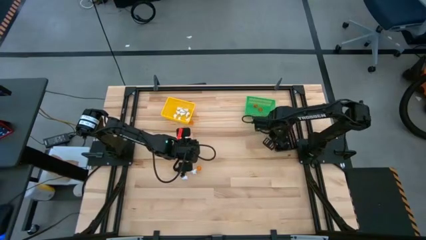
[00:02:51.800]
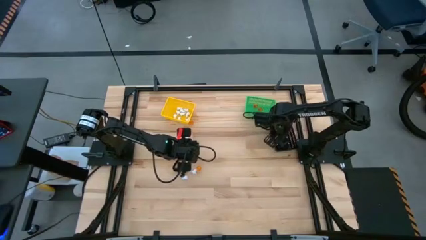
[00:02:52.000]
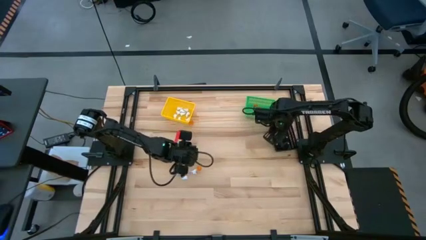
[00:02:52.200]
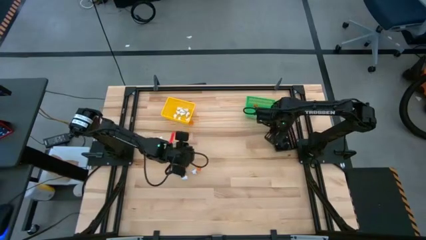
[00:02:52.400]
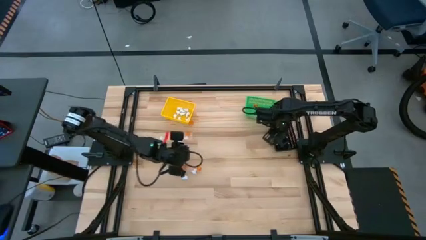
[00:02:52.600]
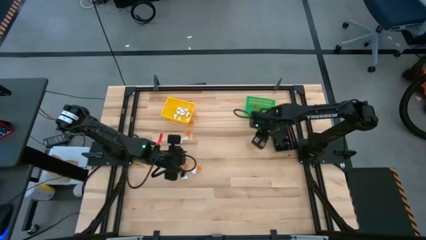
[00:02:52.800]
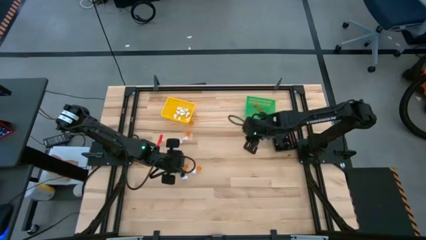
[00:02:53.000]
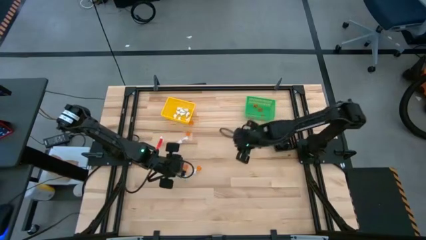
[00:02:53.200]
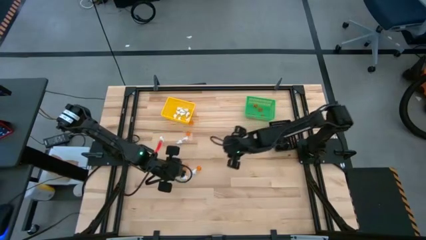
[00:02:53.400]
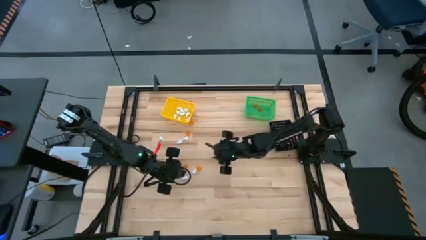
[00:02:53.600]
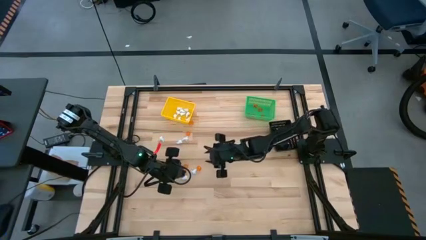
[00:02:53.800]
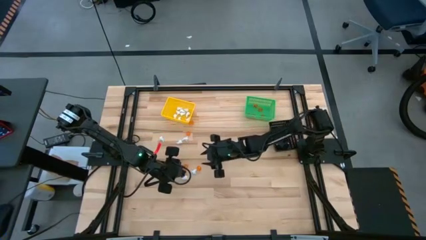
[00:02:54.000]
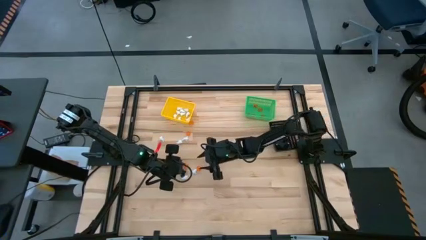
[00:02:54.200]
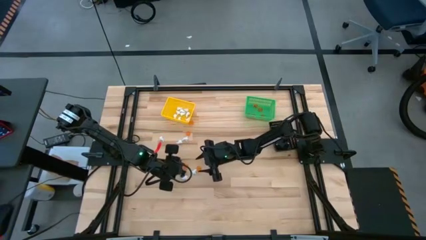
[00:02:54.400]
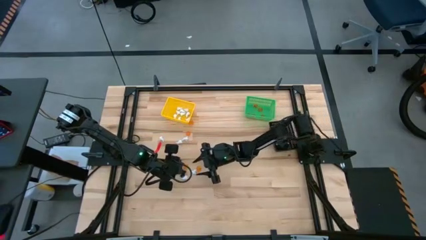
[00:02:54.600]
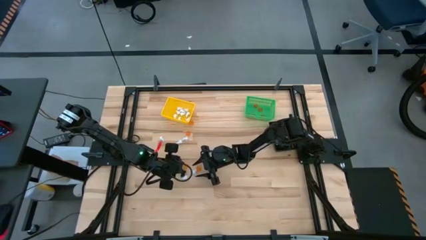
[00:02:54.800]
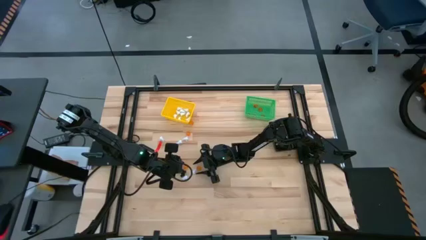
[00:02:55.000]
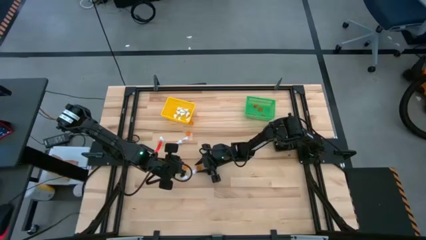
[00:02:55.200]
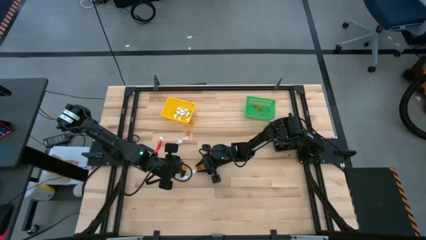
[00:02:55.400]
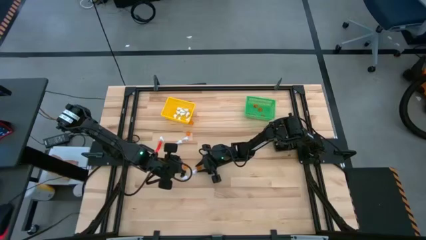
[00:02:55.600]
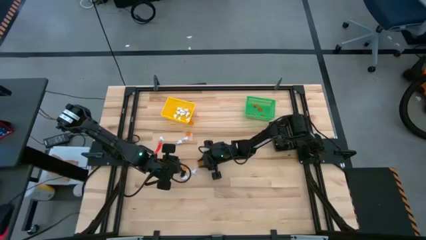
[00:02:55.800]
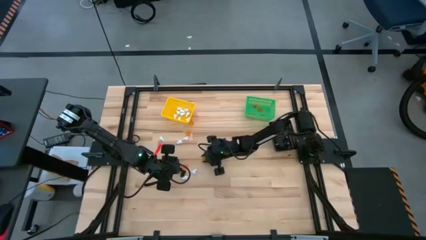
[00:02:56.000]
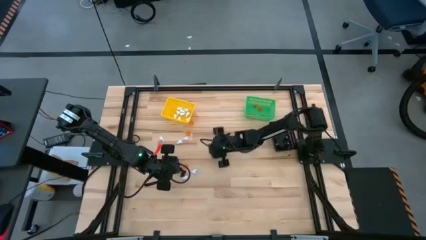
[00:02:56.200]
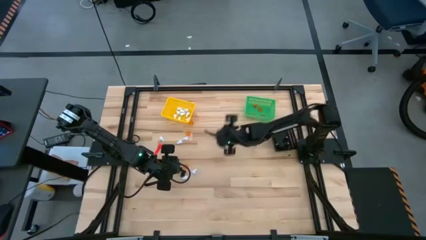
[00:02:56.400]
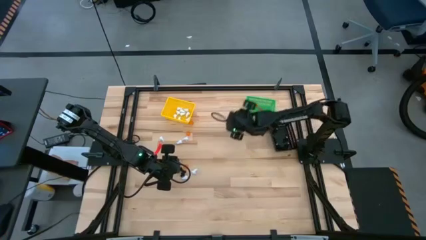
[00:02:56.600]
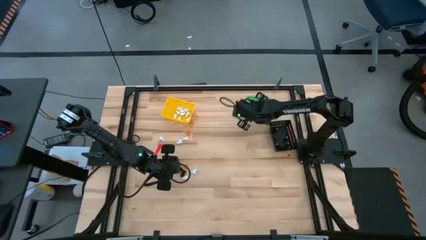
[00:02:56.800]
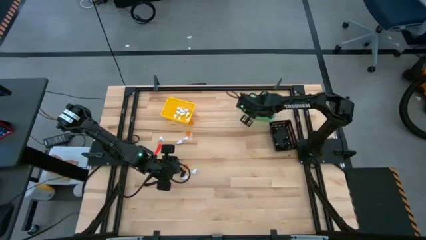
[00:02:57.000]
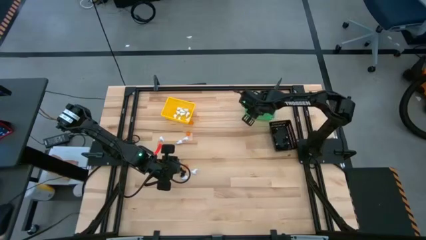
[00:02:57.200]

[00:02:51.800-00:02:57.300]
Task: Sort Halloween decoration
Put the orange pumpkin toy into the green bin

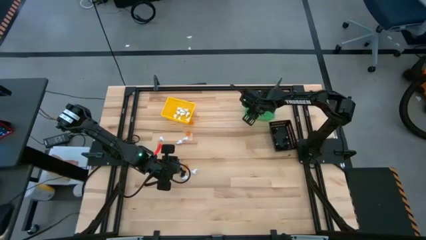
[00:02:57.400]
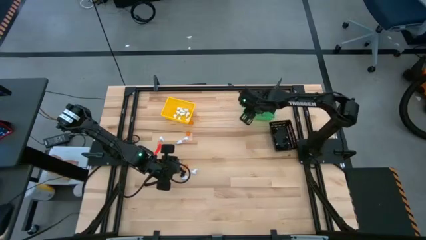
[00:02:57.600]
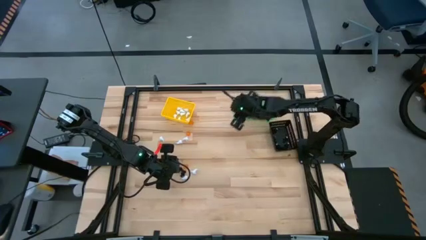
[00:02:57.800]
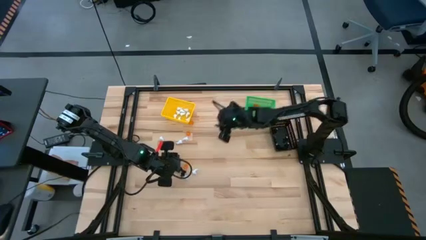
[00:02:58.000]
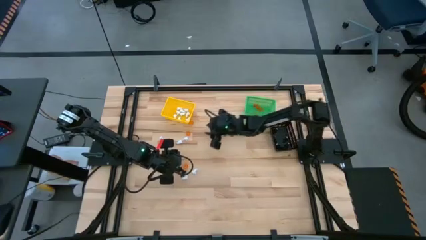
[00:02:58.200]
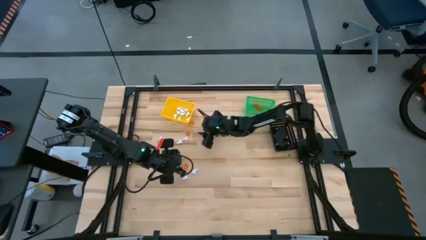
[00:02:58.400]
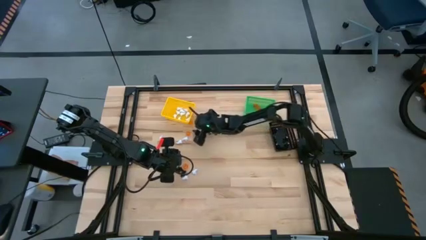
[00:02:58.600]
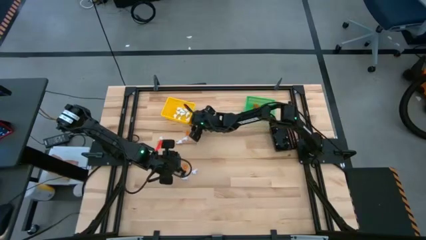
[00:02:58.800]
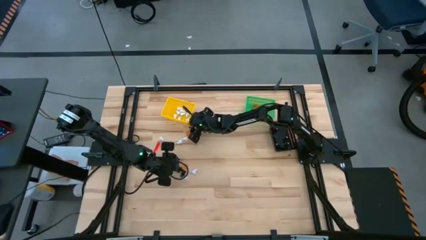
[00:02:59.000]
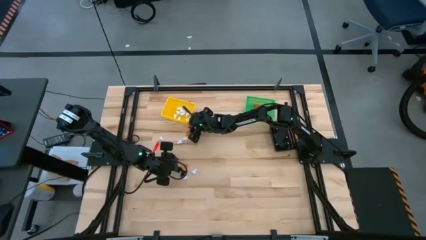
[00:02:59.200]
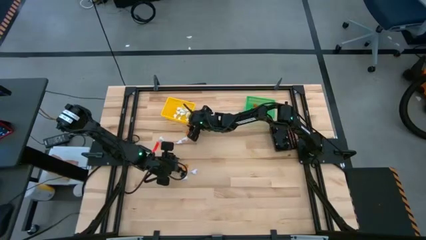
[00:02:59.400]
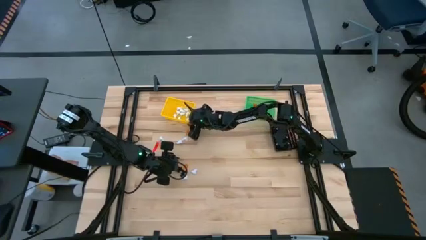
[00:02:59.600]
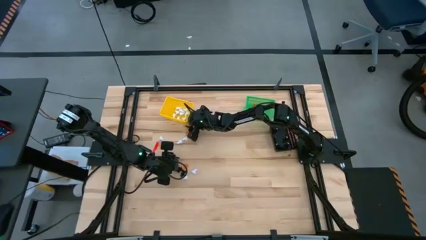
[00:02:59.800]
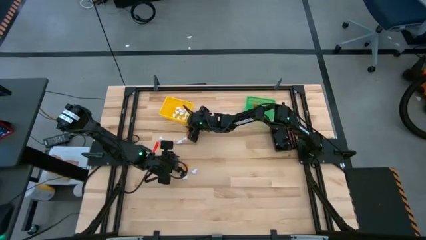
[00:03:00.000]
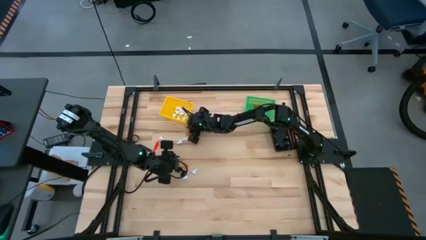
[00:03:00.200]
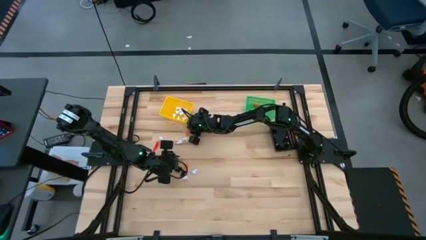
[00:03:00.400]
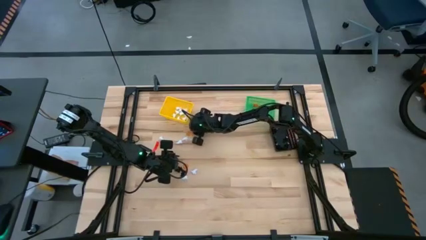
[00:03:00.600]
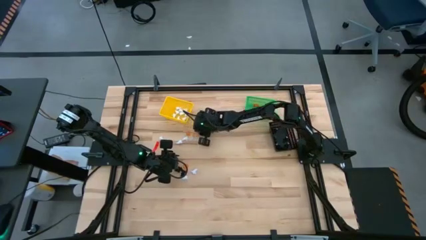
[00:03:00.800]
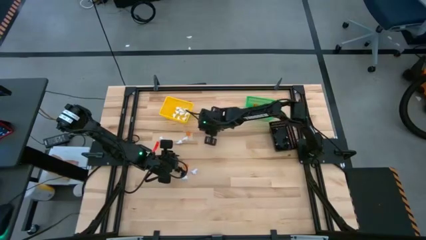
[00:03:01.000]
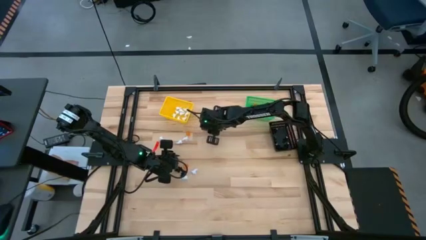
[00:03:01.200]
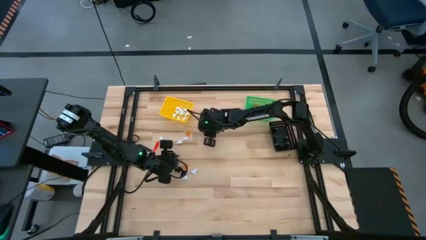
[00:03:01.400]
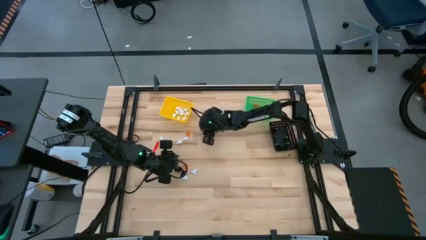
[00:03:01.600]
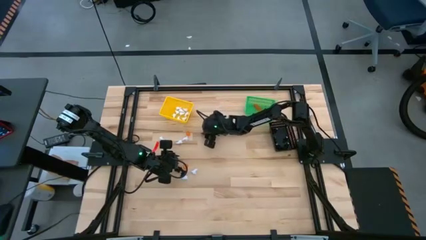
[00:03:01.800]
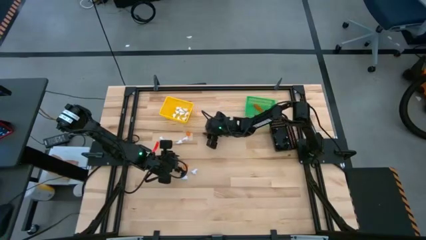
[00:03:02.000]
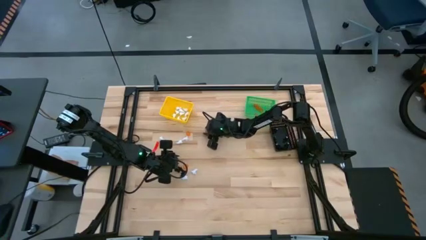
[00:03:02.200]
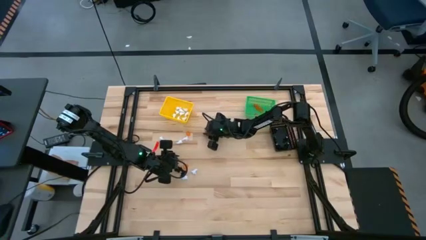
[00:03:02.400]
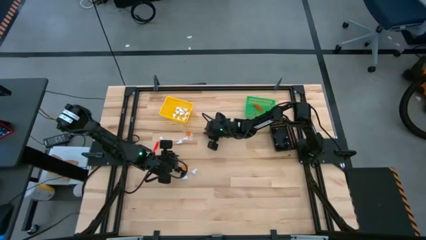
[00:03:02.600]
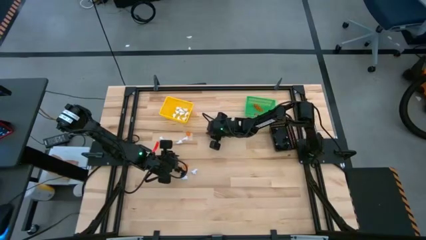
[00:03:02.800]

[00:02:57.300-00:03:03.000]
Put the orange pumpkin toy into the green bin

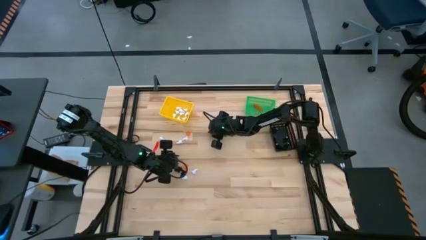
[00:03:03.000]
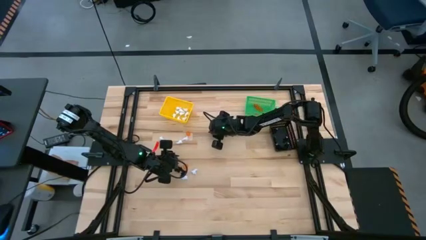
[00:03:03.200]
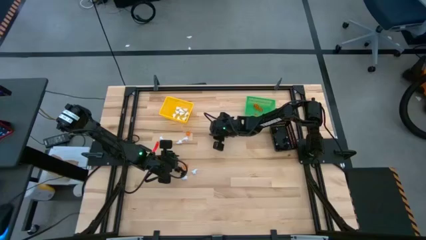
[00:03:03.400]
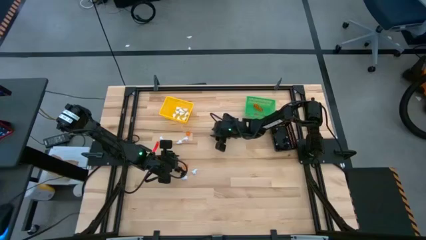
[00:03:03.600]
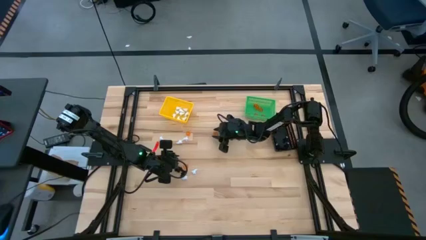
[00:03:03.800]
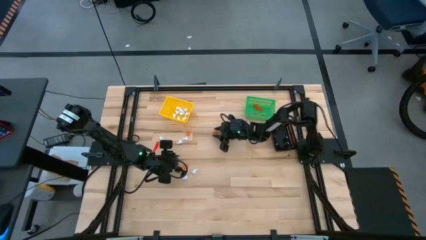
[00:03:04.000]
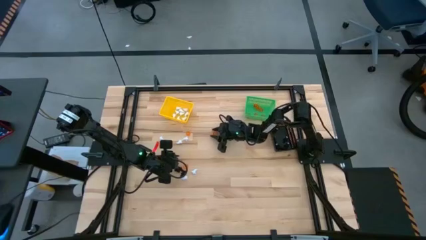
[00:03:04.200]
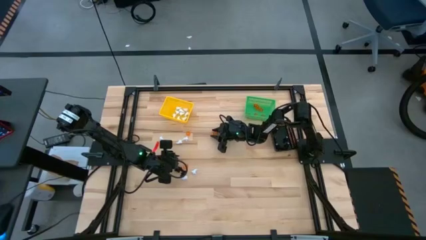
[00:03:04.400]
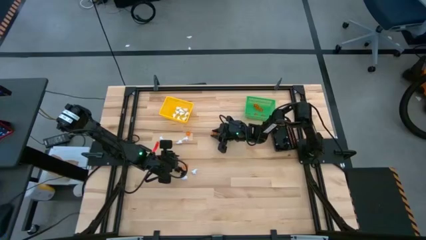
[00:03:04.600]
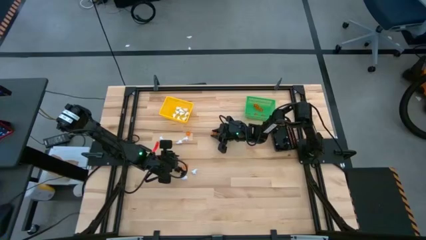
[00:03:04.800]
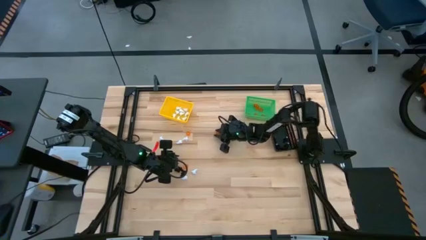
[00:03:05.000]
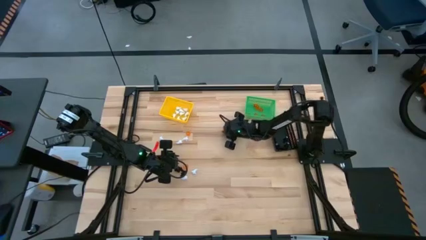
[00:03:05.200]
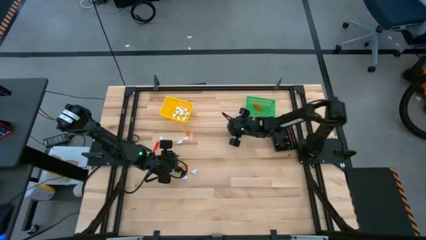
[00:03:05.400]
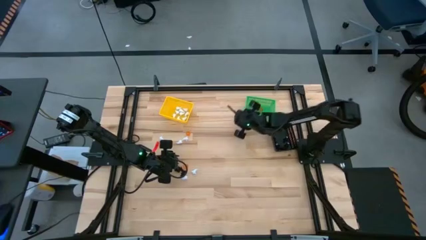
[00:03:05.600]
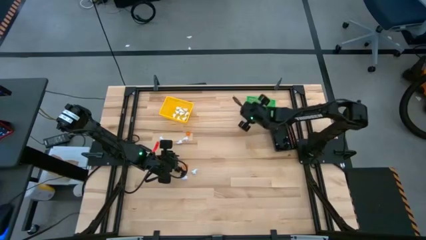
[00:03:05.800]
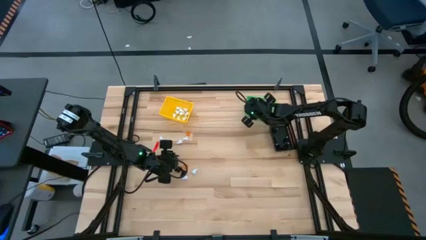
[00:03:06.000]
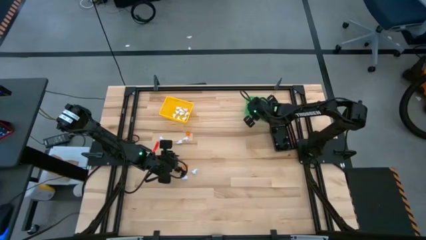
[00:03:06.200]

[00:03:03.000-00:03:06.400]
Put the orange pumpkin toy into the green bin

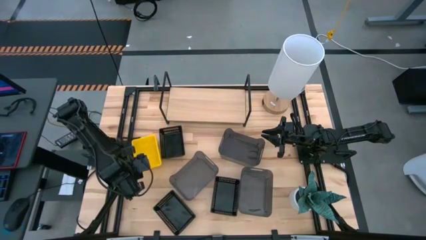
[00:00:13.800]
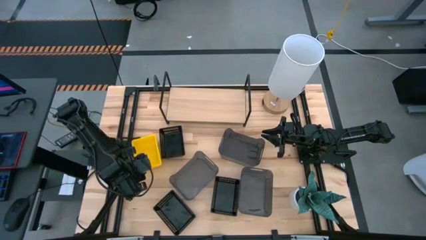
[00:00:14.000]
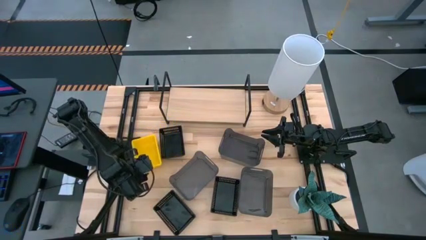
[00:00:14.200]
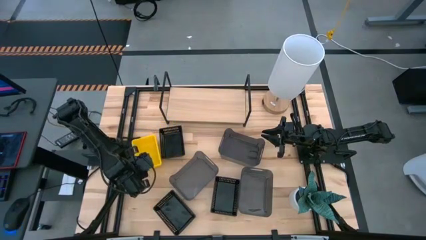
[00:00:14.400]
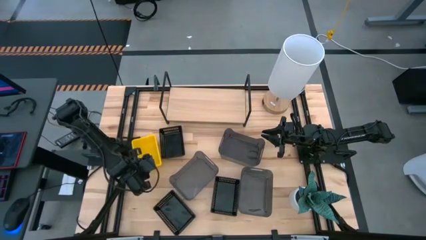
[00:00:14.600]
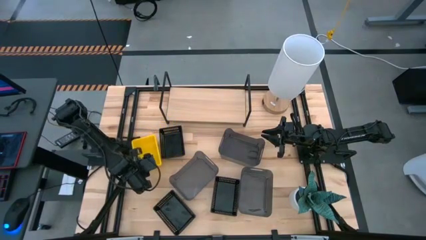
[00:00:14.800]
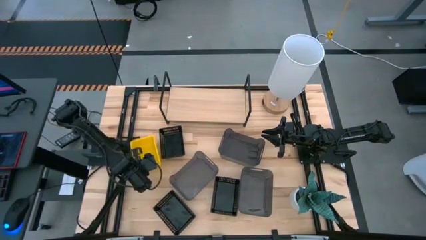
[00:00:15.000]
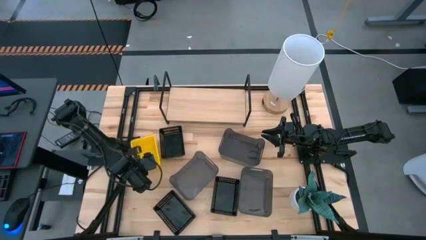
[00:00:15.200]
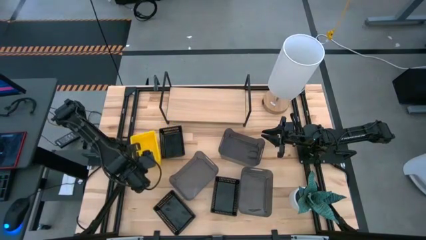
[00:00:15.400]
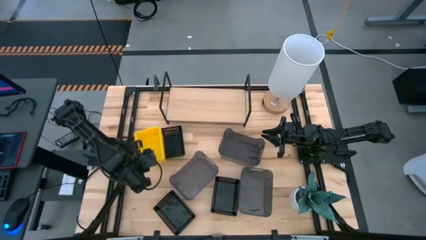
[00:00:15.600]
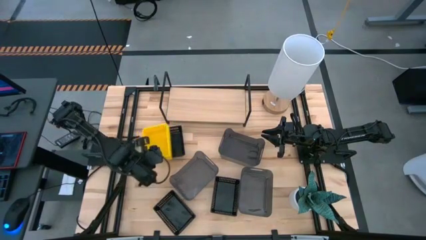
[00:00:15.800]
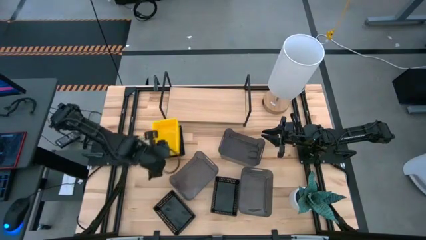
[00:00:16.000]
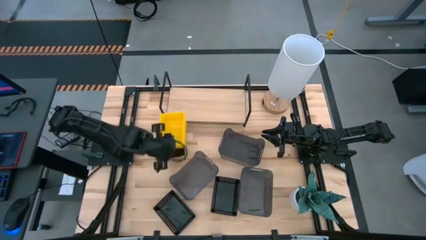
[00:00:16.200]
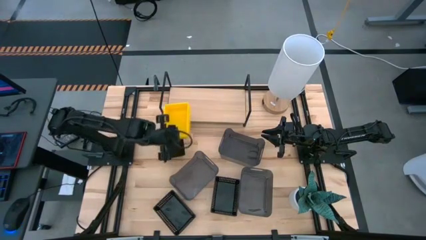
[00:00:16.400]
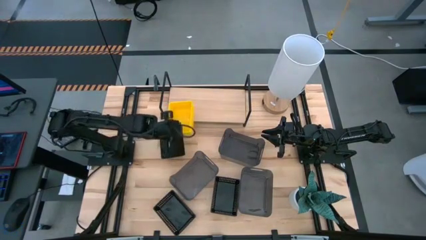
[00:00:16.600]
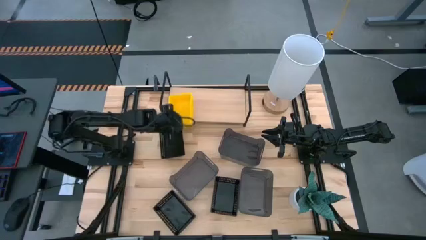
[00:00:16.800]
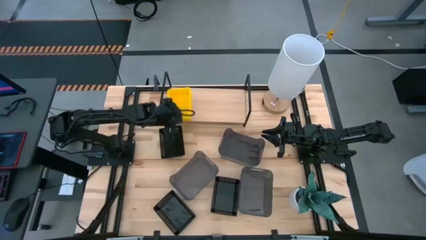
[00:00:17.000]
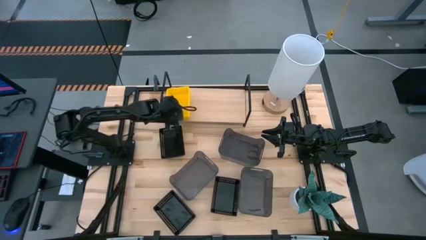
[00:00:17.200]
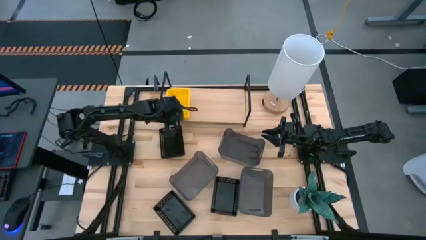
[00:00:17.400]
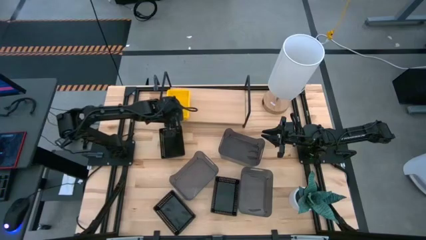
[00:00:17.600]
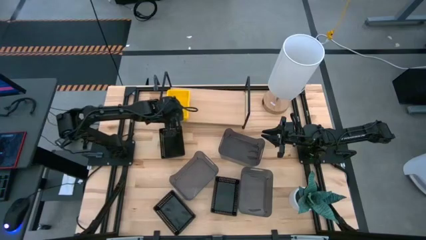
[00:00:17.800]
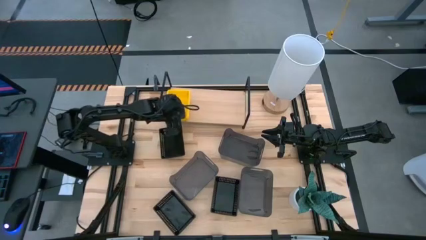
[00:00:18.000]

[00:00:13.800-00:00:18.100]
Task: Stack baskets on shelf by color
Put the stack of yellow bins on the shelf
